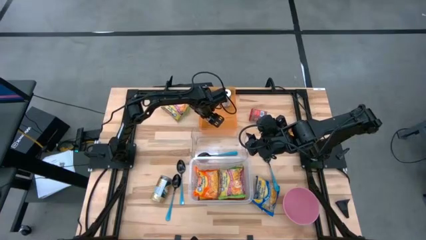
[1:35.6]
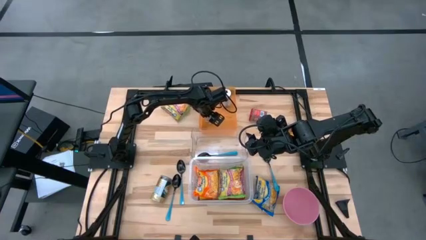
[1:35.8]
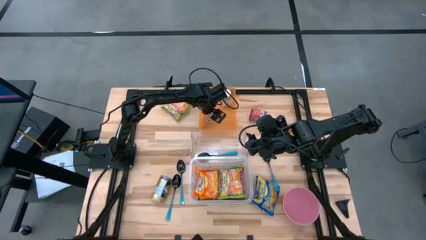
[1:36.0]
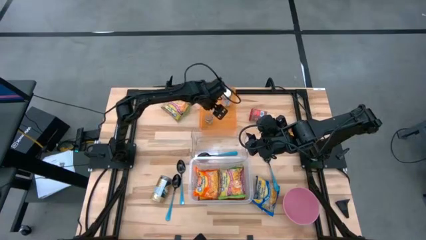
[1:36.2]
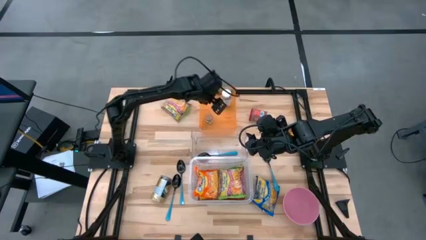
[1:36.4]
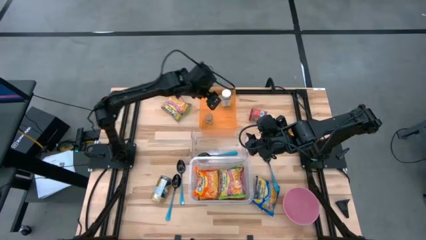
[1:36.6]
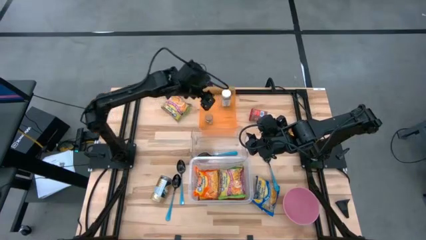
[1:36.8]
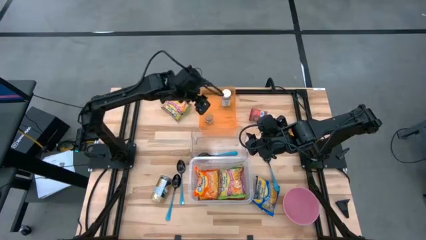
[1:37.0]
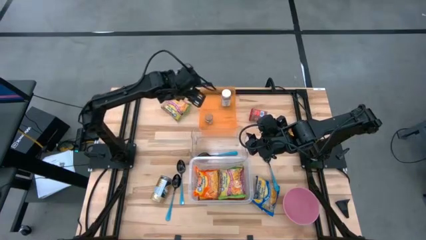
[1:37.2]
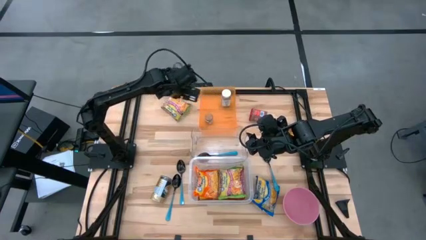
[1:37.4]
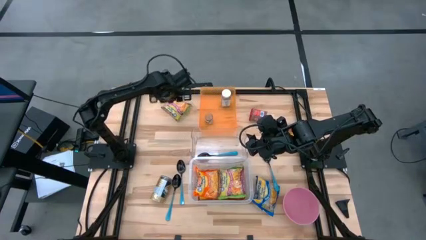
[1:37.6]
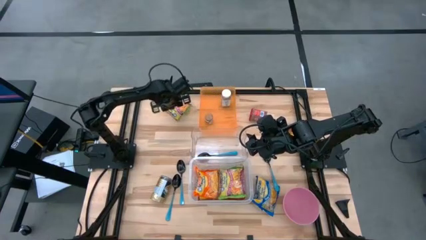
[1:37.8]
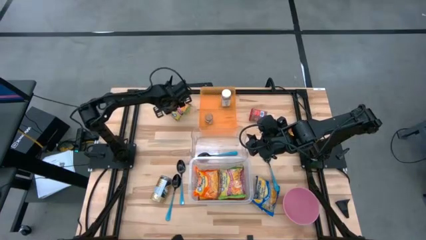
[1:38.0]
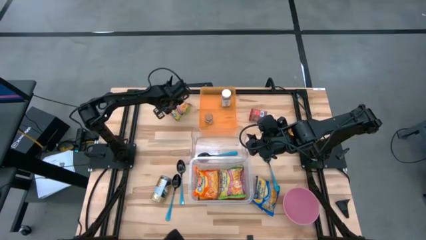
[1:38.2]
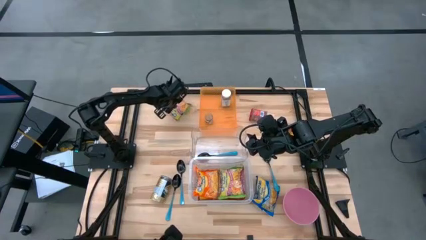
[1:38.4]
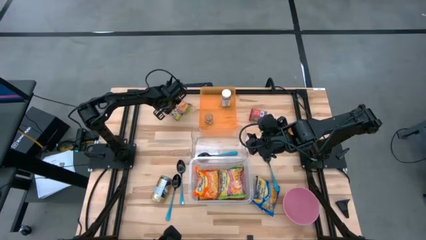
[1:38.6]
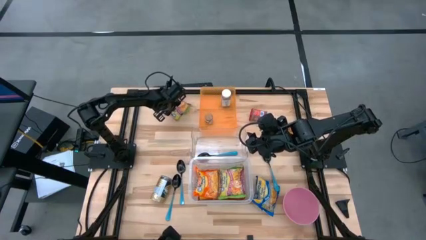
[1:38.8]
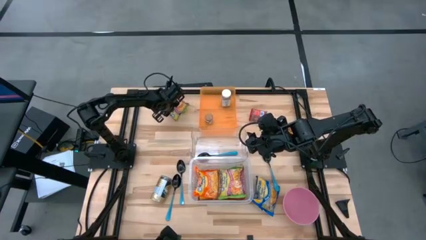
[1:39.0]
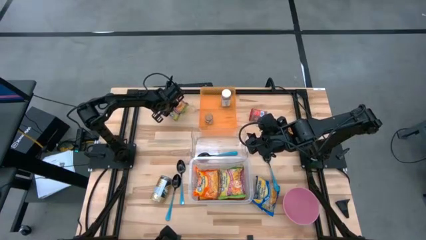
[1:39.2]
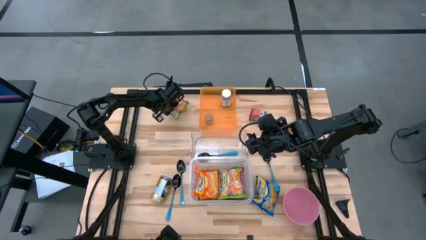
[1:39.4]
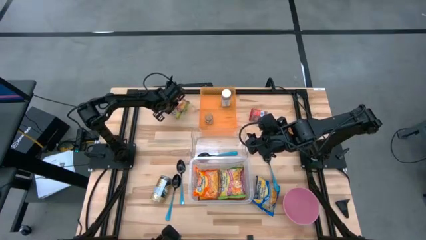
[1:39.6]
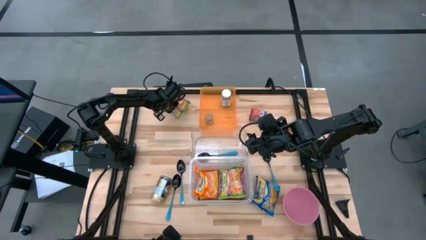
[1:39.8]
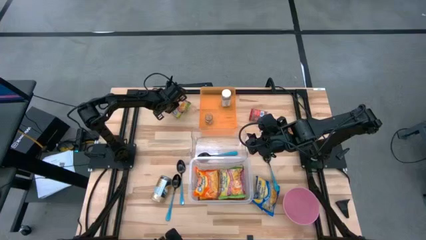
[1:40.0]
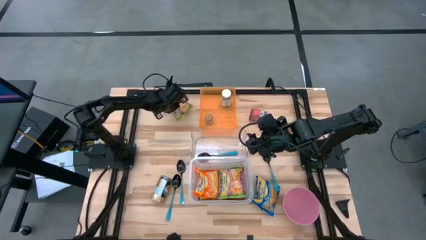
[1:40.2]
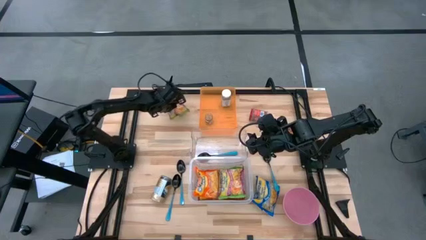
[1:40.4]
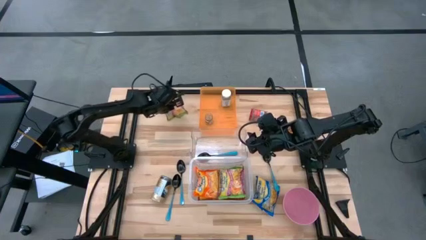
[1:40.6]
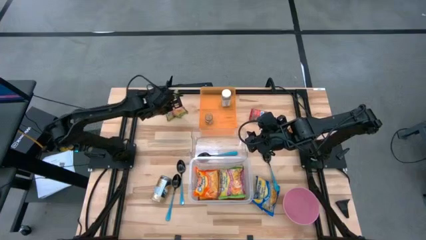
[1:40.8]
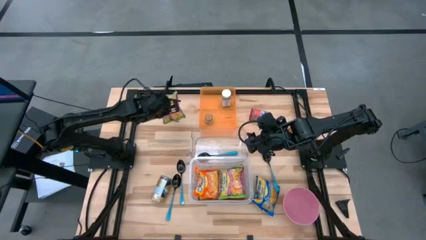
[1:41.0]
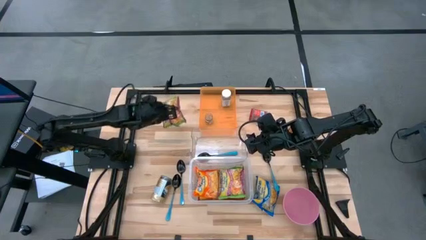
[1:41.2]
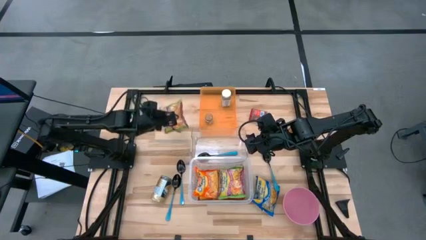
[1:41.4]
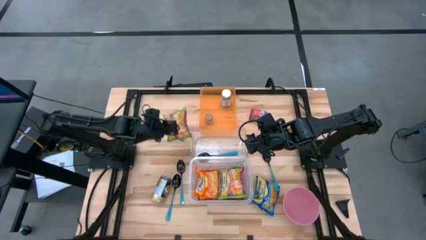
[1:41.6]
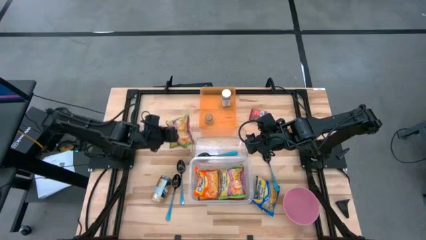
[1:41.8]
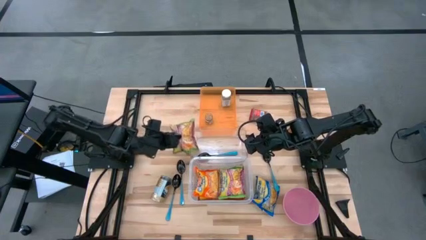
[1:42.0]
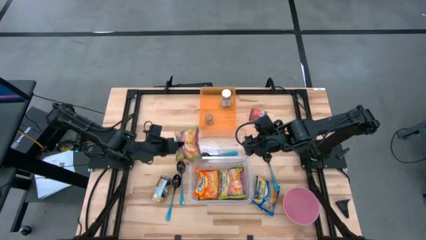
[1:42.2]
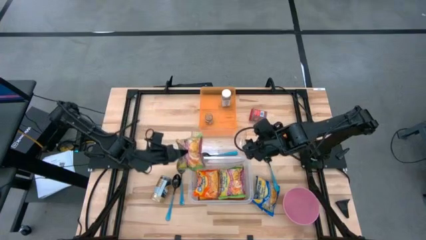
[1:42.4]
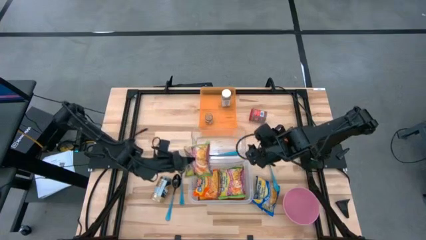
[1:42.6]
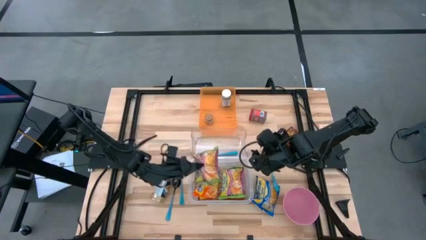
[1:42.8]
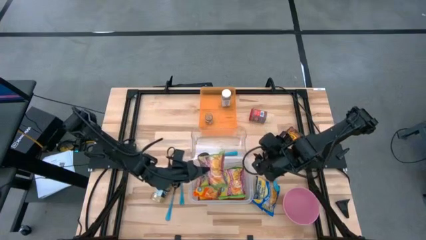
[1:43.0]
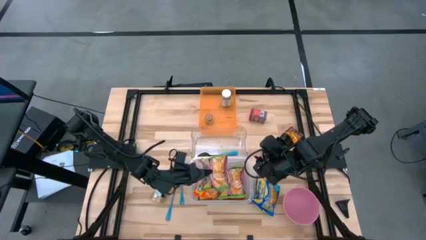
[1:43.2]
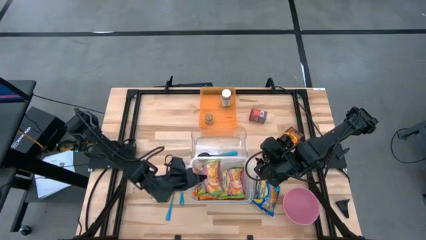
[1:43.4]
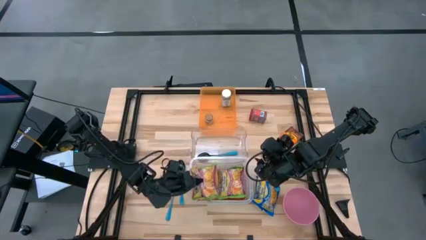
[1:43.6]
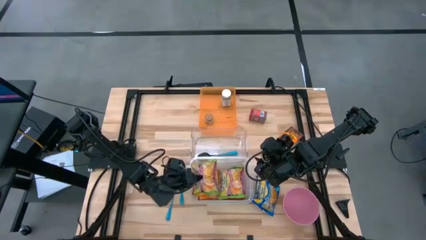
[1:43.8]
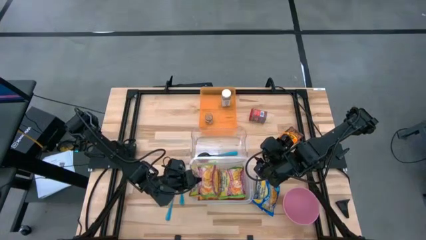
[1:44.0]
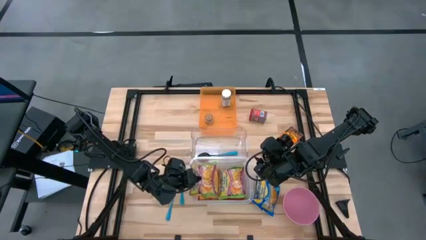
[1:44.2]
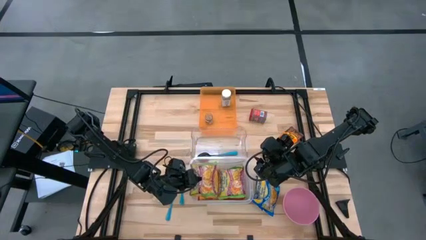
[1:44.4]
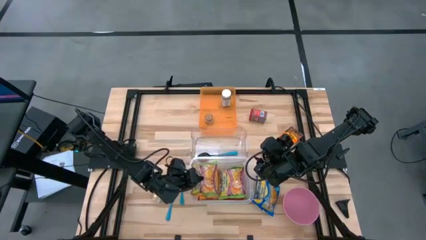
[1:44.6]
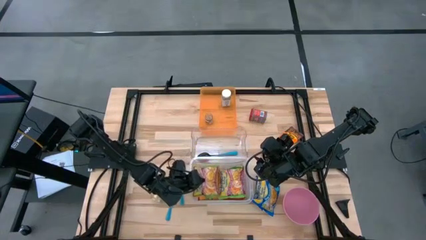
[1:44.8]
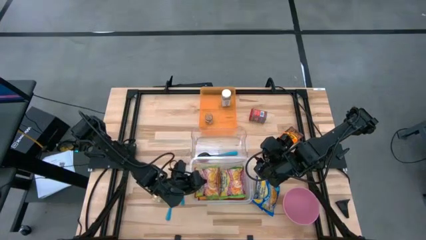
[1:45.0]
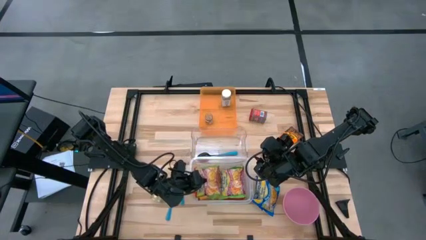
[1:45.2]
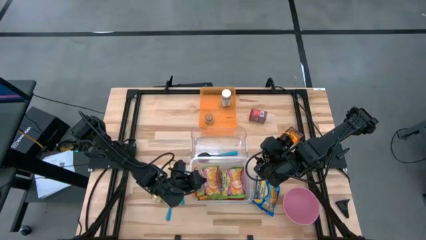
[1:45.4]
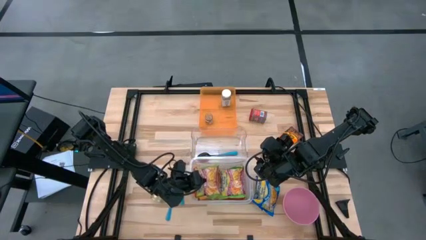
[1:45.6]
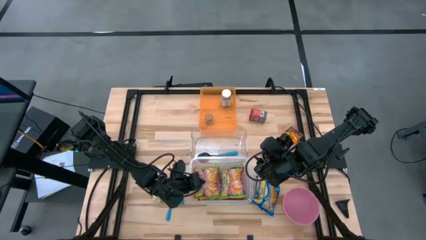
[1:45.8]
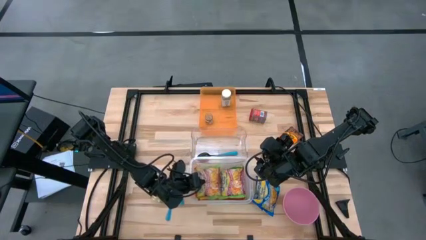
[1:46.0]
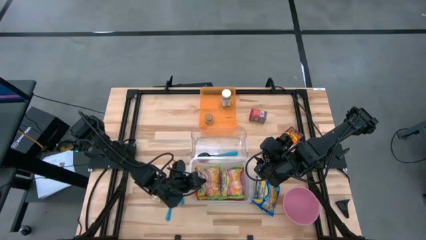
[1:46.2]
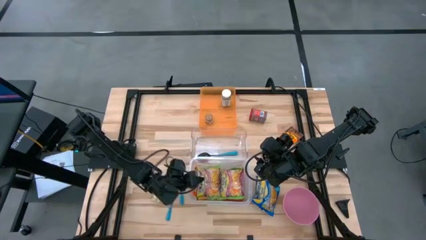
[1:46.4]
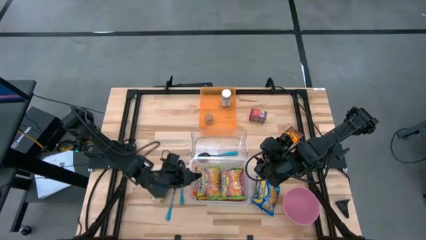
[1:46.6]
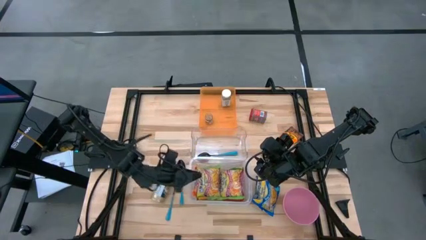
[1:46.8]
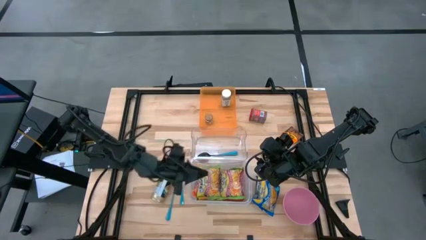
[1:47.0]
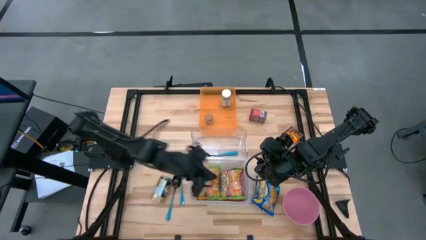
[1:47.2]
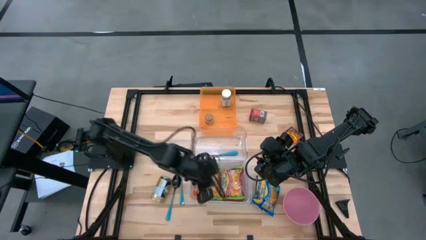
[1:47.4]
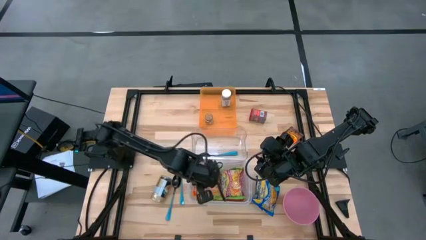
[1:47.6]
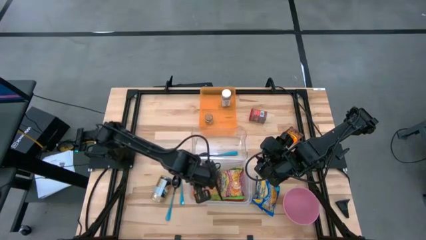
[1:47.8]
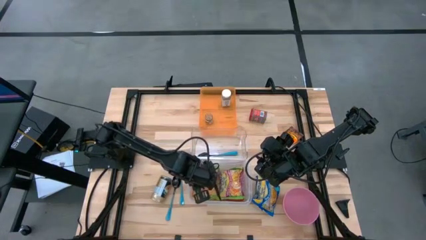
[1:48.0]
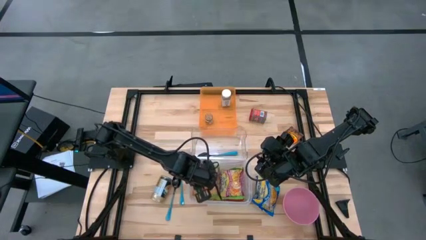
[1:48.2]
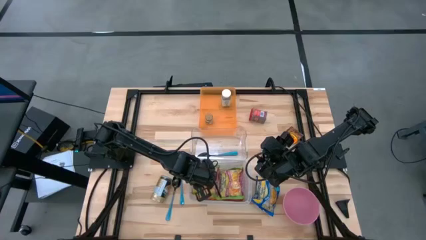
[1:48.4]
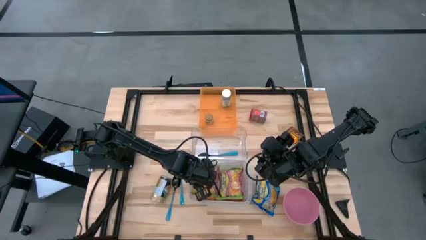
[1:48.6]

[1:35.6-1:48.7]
Task: Pick & Place Food Item
Put the green noodle pack into the white transparent bin

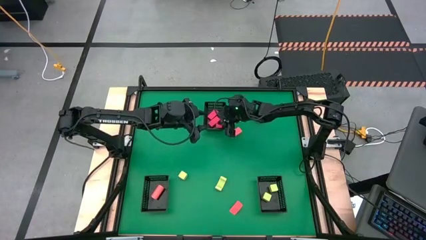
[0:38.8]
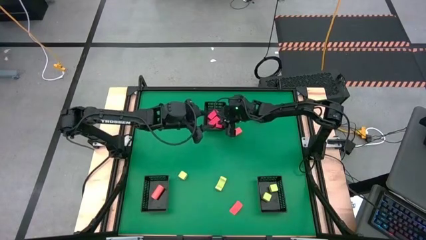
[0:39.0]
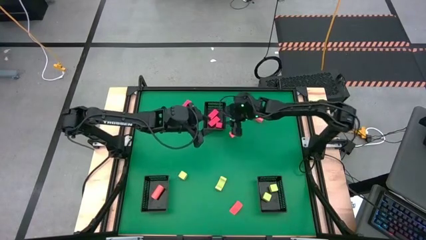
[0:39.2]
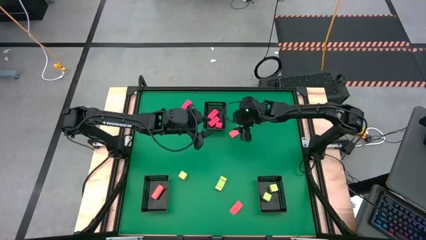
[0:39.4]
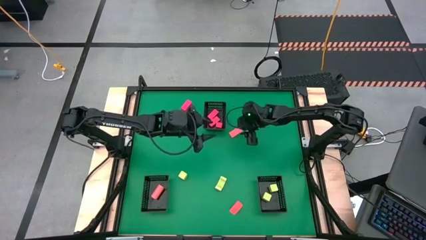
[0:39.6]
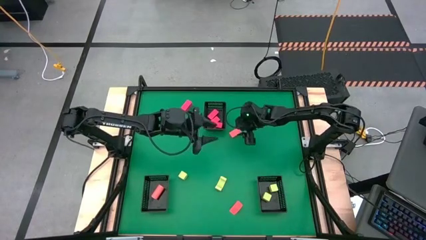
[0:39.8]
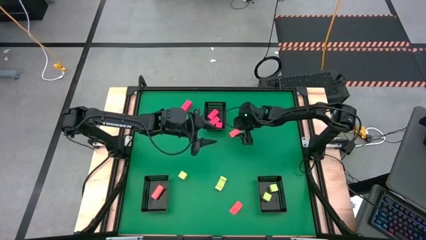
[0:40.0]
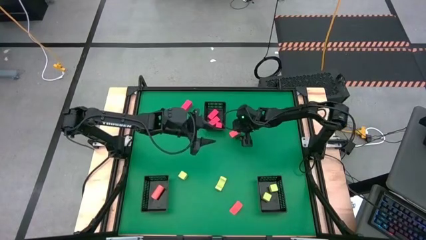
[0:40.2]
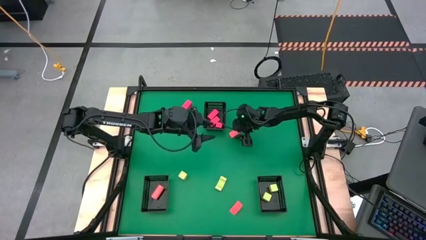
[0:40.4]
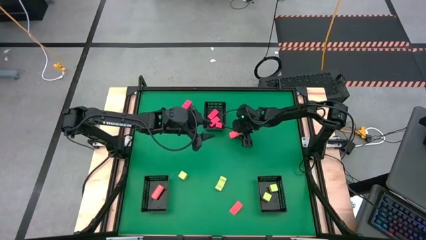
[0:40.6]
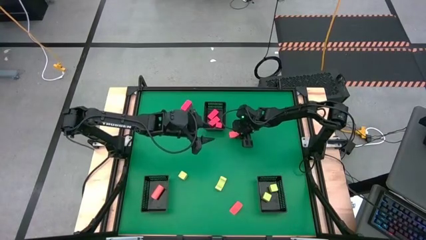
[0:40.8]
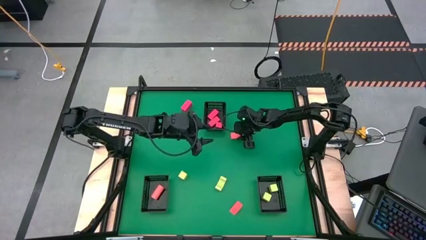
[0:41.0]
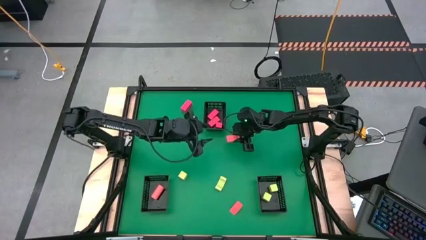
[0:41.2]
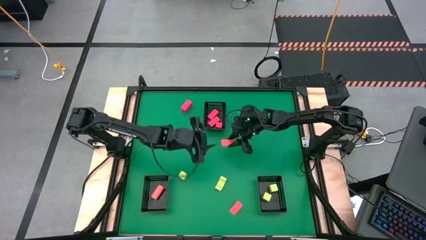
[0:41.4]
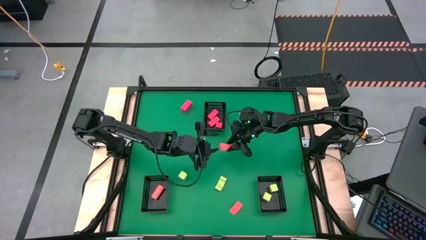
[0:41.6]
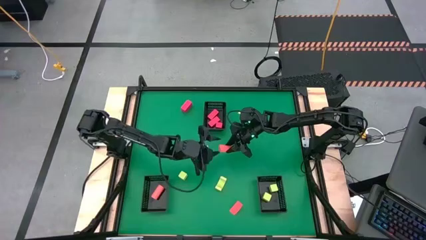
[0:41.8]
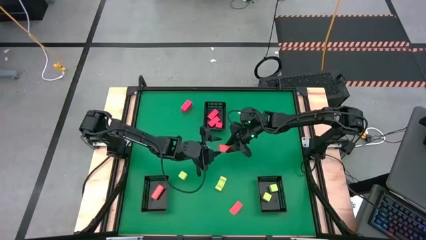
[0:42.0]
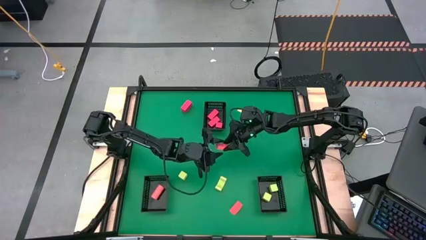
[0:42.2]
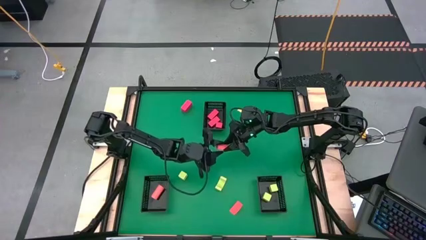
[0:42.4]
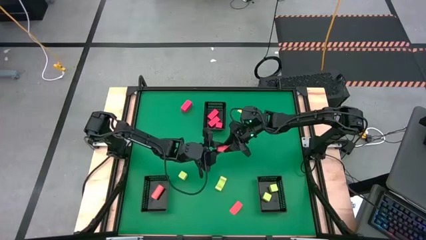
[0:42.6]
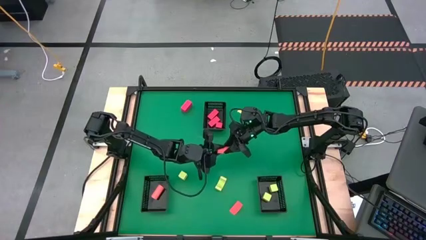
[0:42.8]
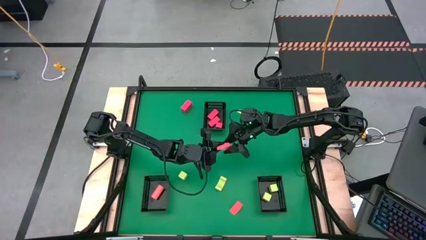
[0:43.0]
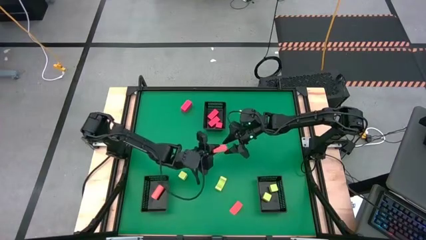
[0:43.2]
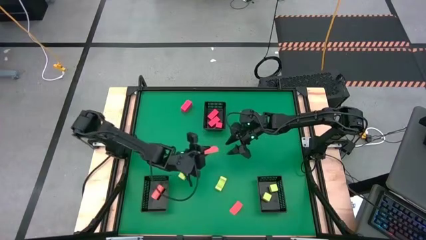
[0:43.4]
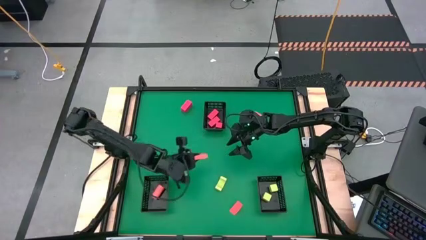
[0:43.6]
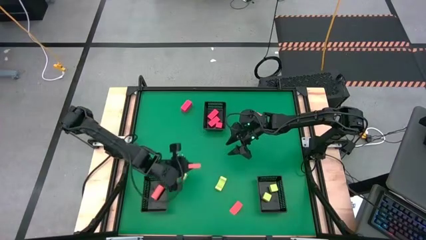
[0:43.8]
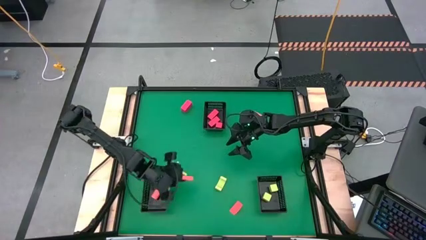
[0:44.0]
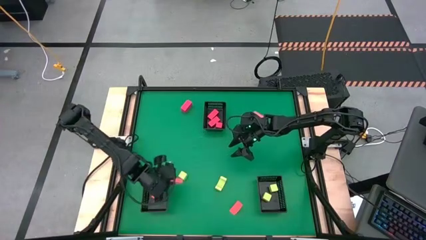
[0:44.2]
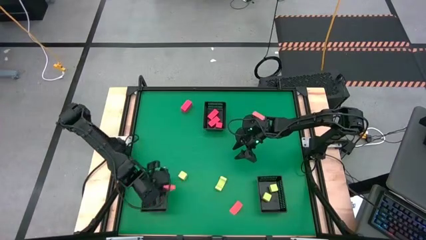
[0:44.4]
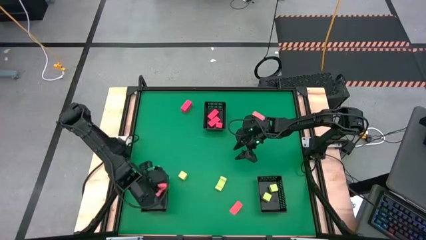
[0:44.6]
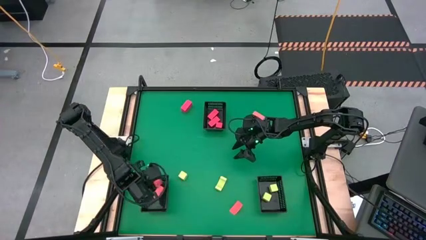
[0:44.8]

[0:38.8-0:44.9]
Task: Sort & place blocks by color
Put the orange block into the bottom left black bin
